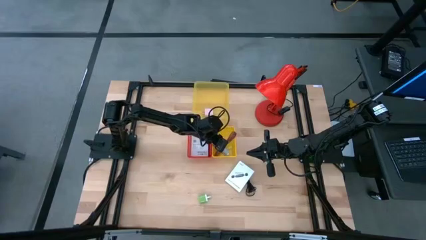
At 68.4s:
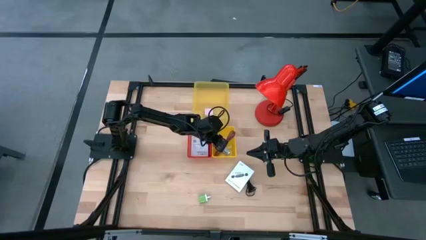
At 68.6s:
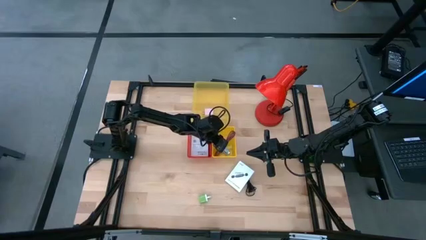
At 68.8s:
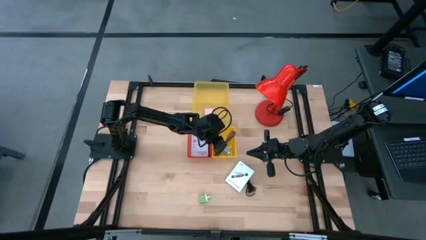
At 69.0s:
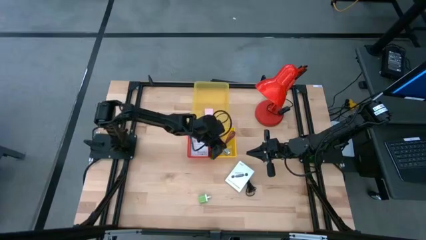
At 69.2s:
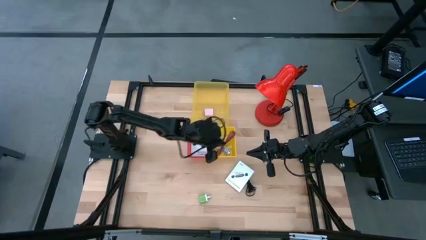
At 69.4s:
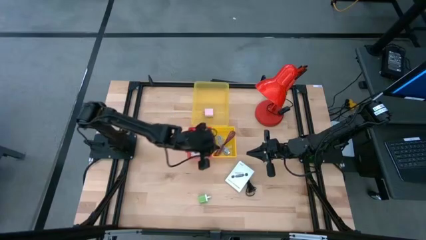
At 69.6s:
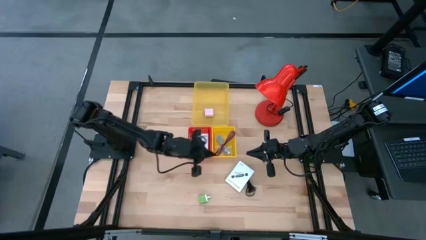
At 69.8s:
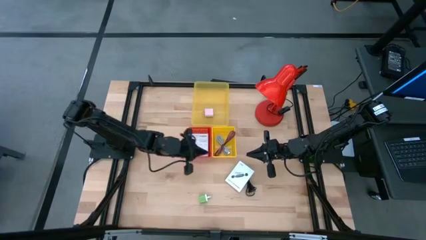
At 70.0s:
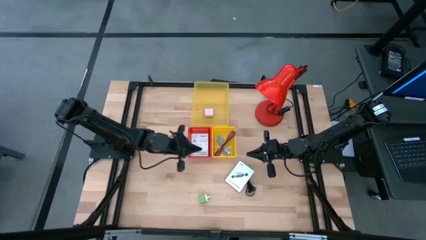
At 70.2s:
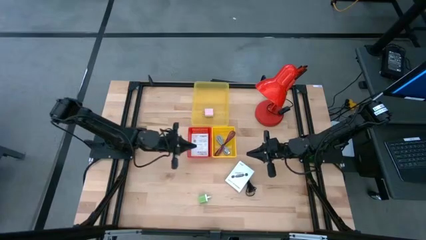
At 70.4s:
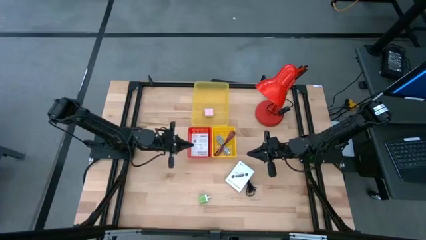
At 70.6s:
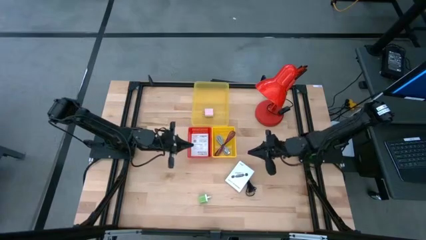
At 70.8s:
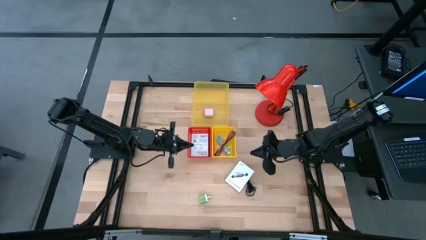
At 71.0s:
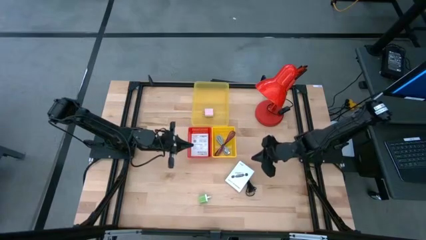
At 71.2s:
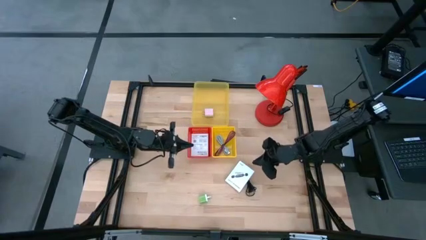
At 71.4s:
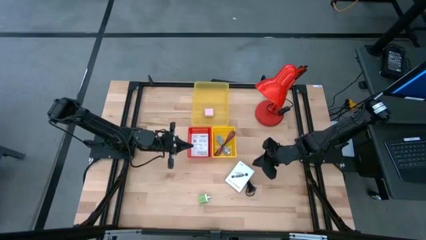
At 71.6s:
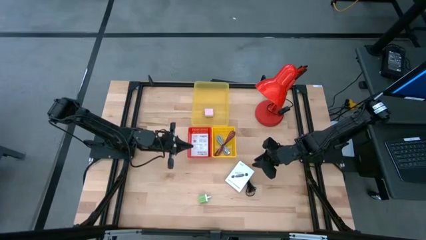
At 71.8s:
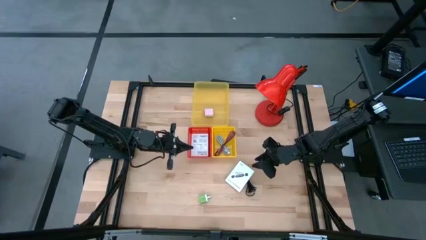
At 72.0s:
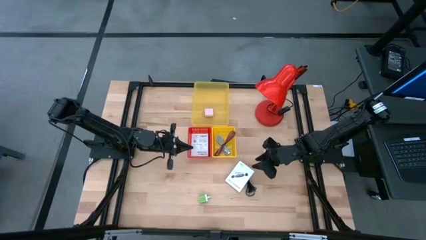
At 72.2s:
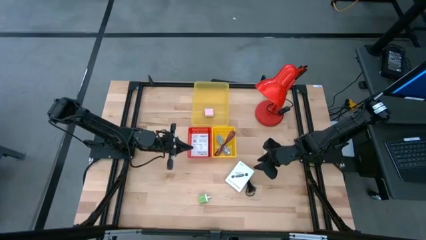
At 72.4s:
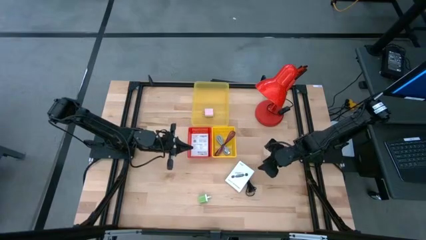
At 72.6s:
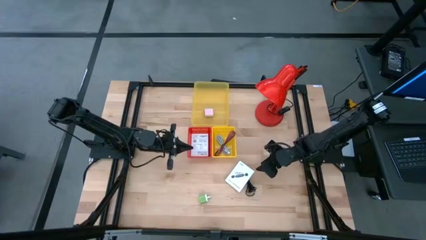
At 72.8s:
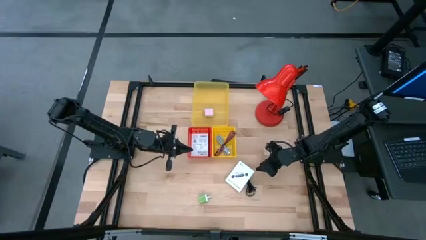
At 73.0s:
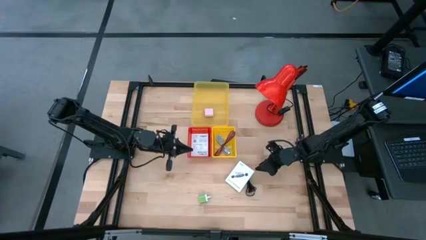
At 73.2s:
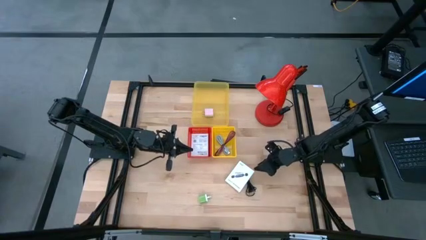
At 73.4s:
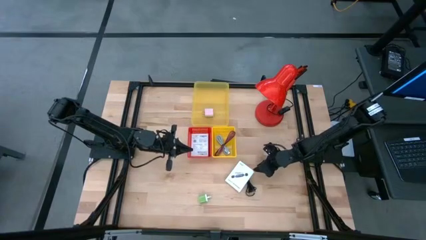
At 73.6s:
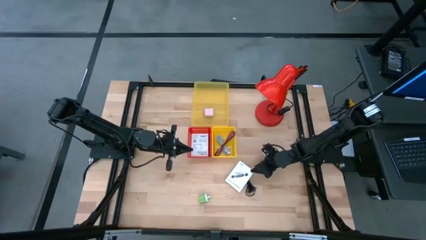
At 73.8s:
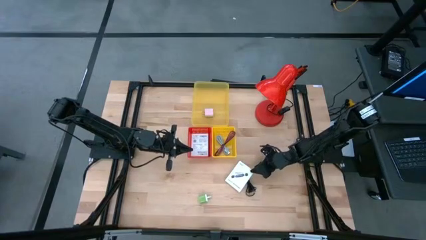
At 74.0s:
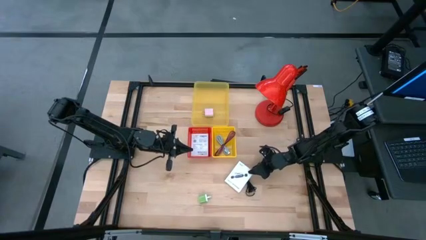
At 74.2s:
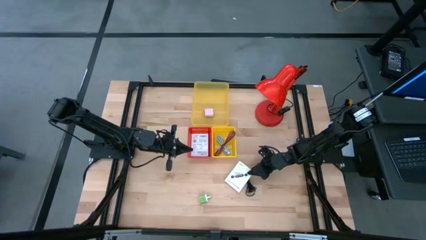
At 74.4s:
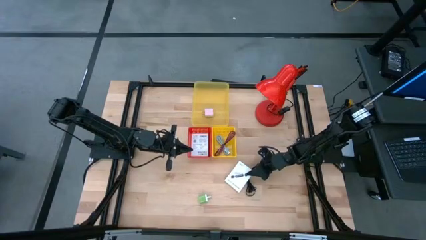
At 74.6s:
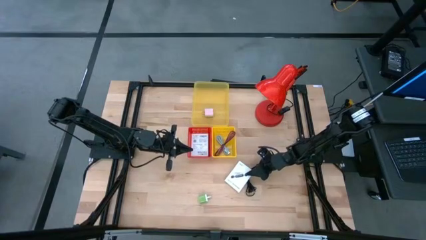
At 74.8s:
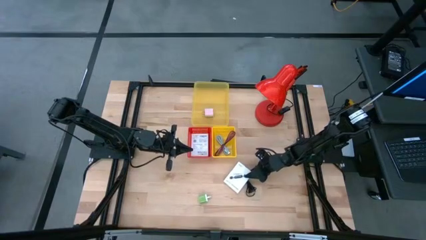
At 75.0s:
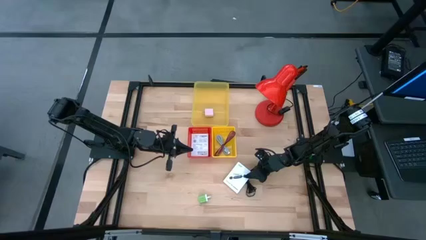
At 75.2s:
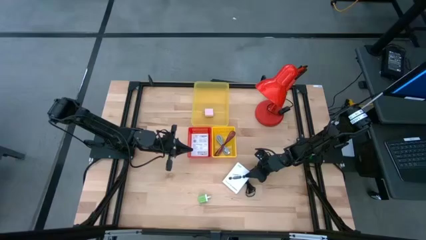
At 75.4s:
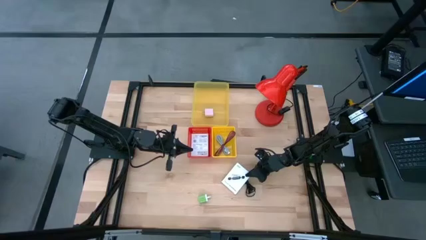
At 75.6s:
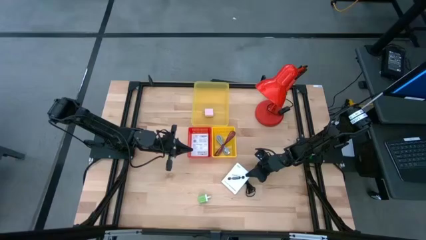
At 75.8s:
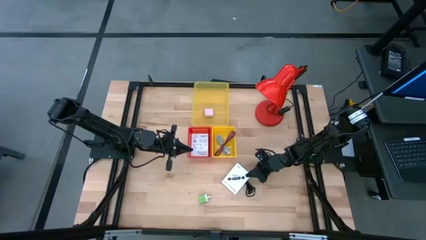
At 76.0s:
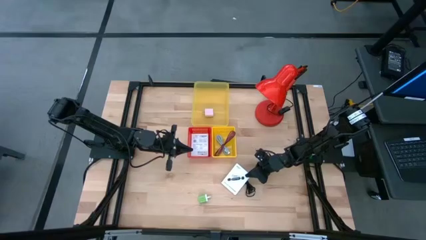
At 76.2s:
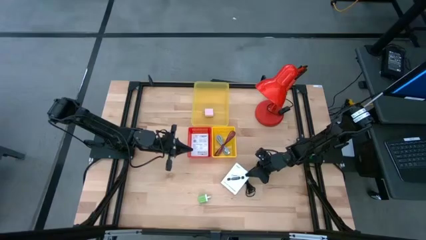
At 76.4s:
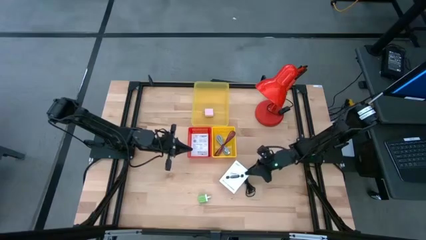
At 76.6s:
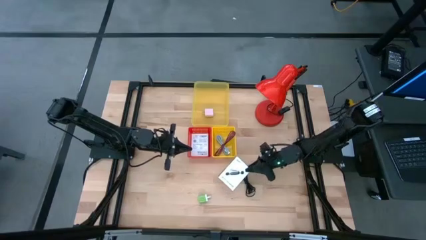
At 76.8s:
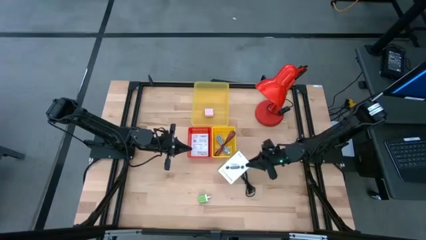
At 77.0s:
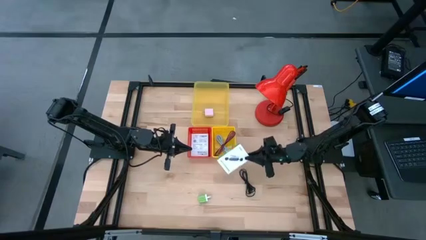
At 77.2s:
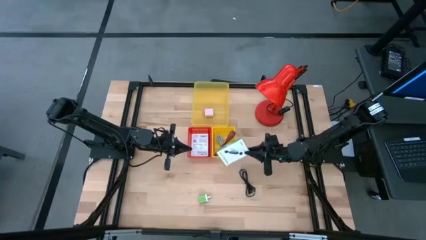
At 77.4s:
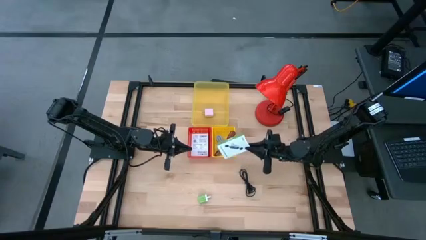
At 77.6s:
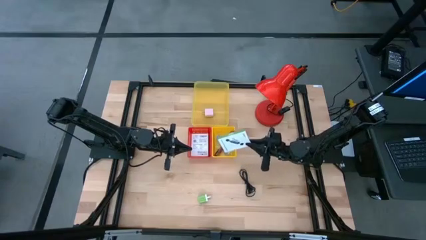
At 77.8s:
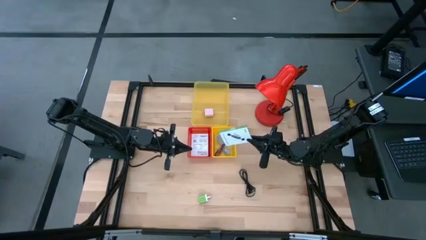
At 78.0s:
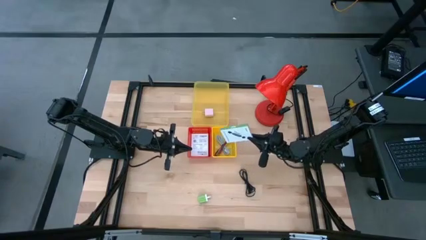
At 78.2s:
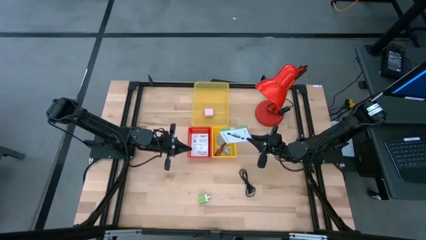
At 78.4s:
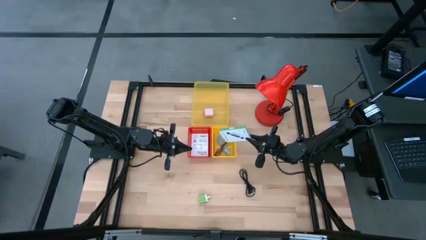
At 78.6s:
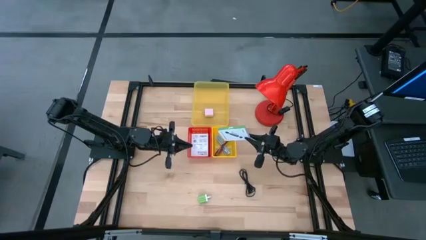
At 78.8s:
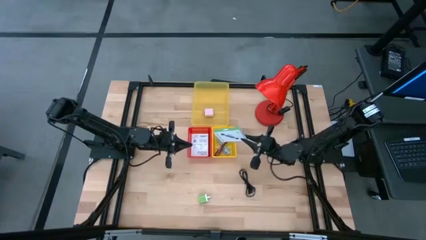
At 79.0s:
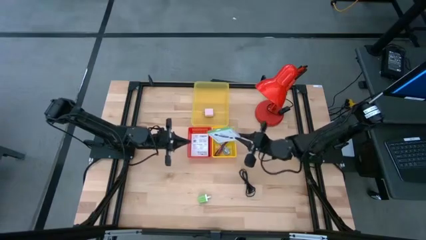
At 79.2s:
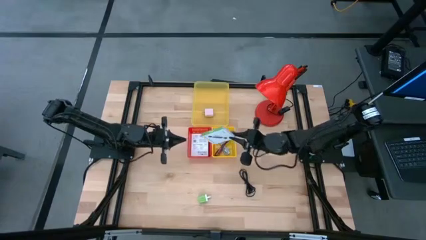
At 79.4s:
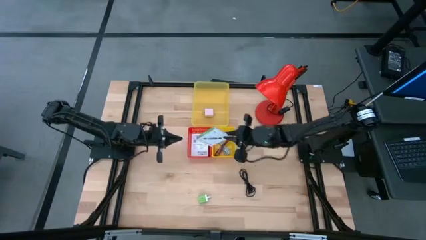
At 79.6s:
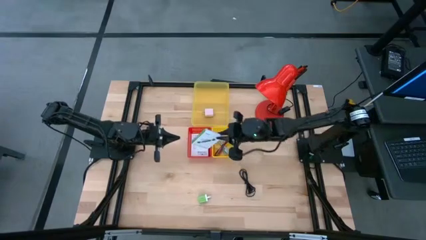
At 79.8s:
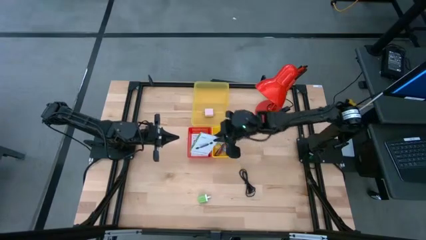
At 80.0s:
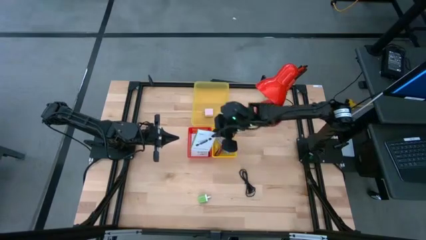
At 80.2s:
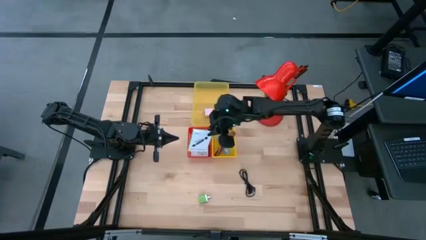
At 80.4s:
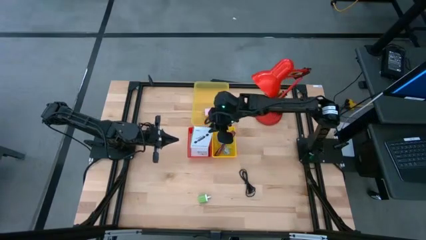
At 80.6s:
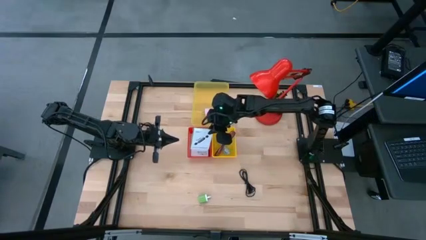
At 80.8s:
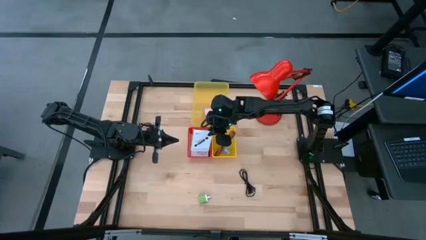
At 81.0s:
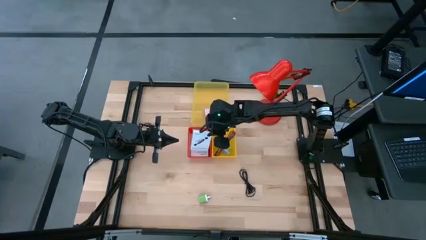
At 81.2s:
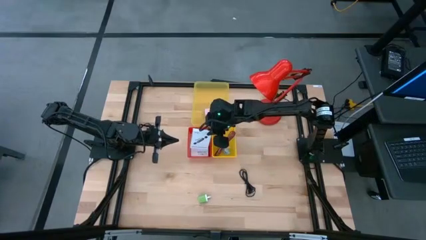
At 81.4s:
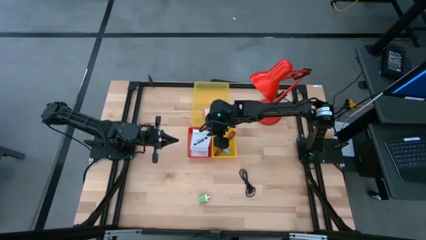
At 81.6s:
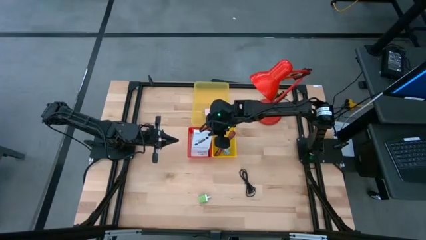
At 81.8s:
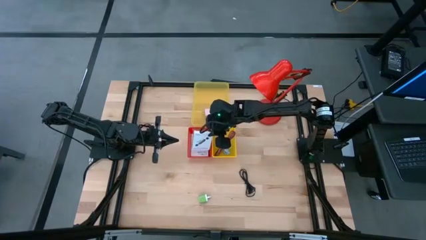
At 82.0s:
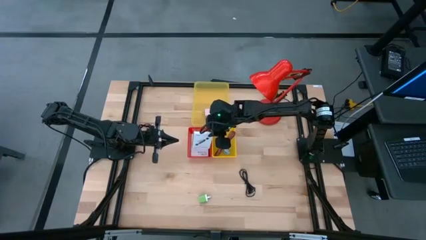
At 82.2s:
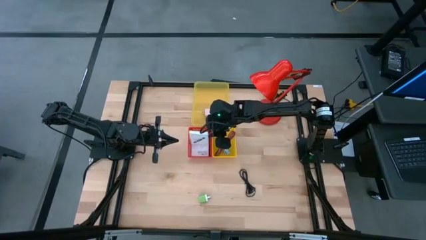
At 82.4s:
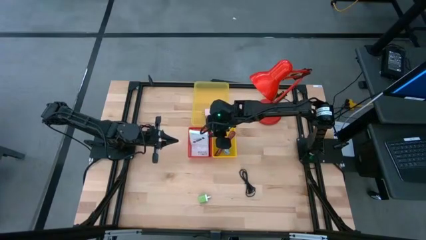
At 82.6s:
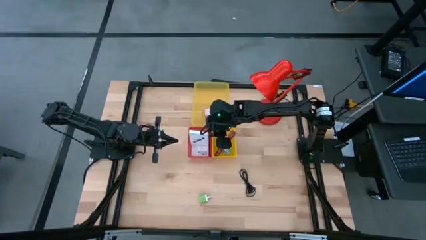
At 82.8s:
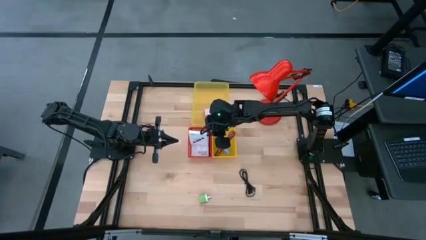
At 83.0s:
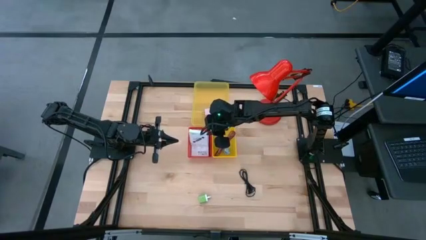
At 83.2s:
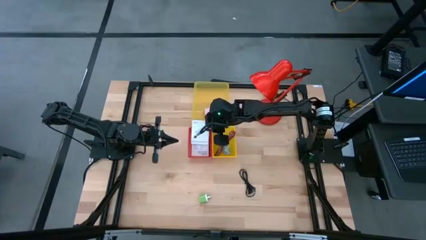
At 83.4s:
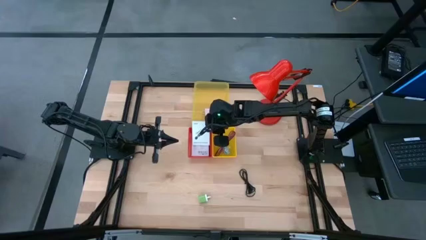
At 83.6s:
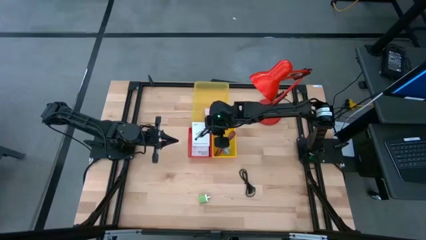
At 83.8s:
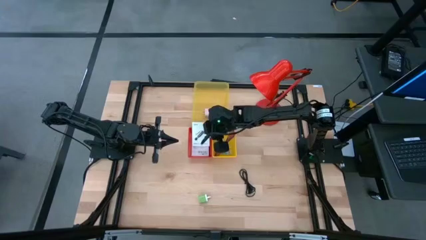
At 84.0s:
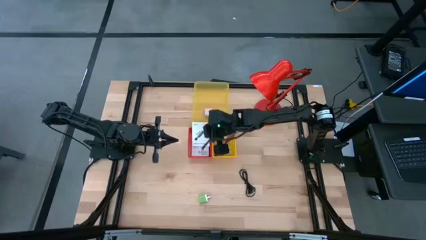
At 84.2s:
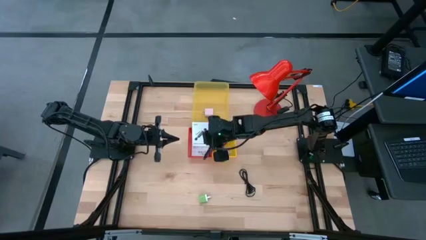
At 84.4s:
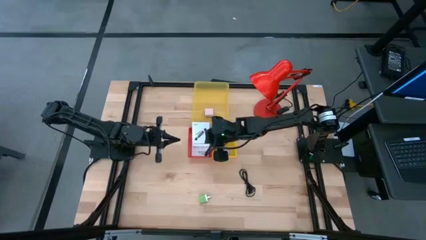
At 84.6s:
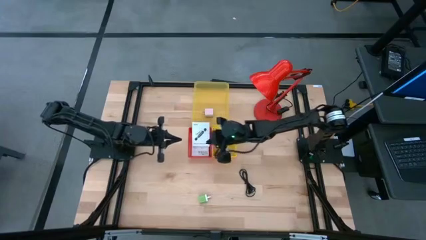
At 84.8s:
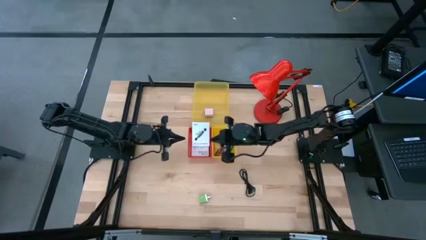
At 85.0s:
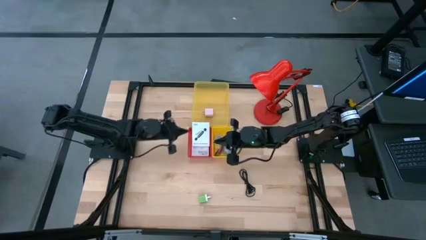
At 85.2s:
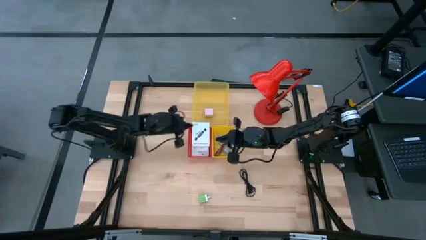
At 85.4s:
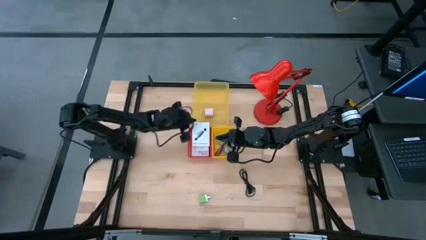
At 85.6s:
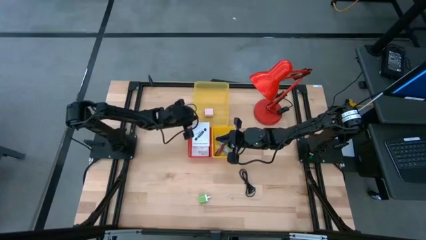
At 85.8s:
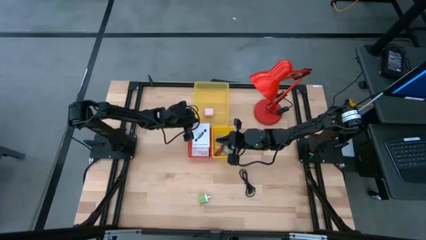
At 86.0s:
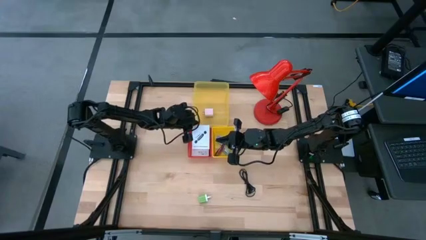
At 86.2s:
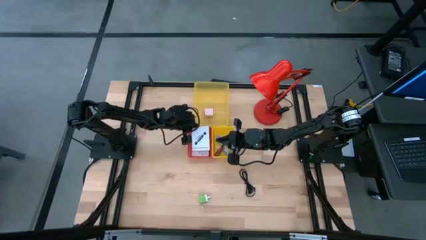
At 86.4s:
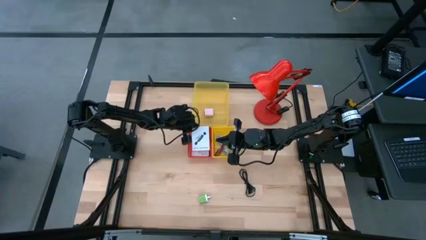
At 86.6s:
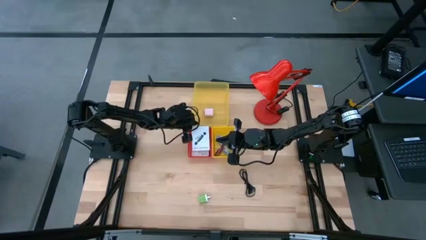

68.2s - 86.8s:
Task: Pick and place items into bin
Put the card reader box into the red bin
